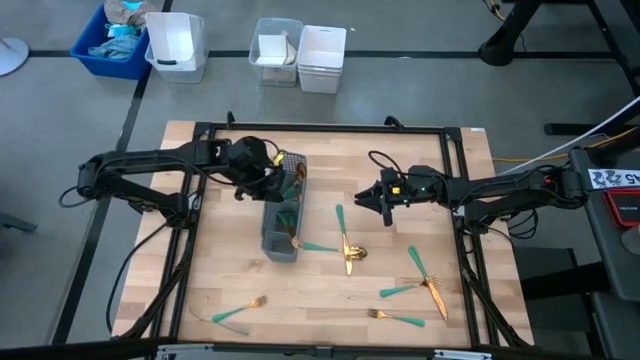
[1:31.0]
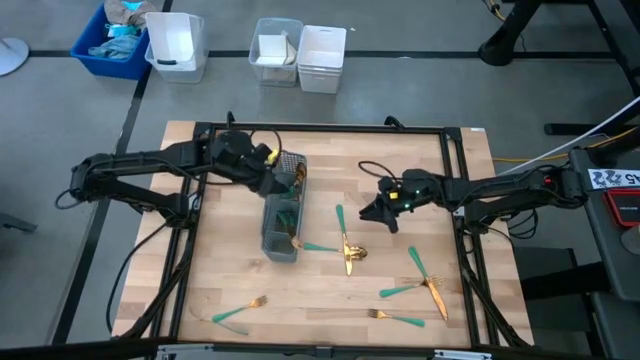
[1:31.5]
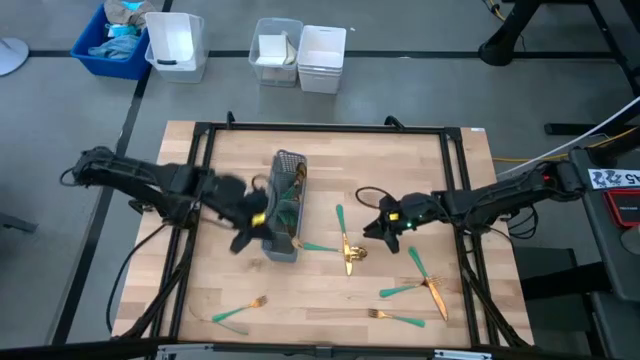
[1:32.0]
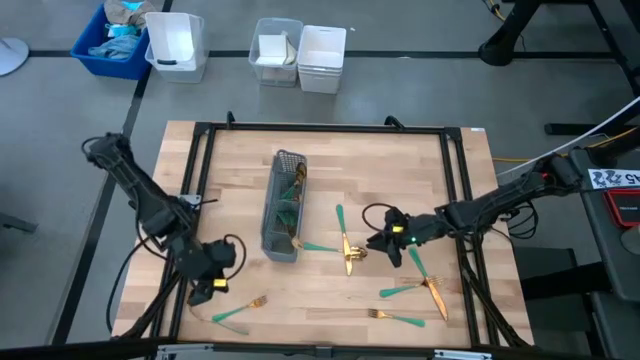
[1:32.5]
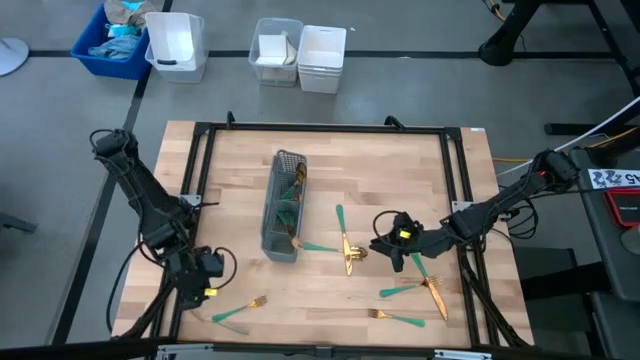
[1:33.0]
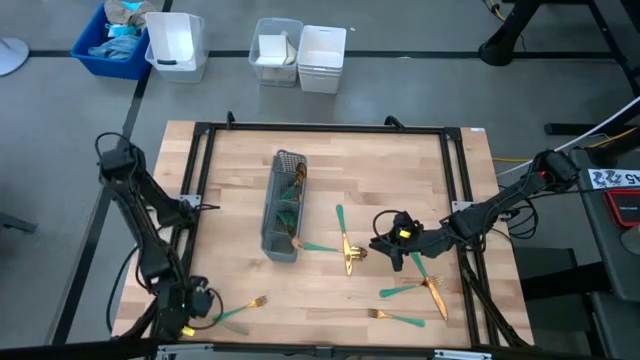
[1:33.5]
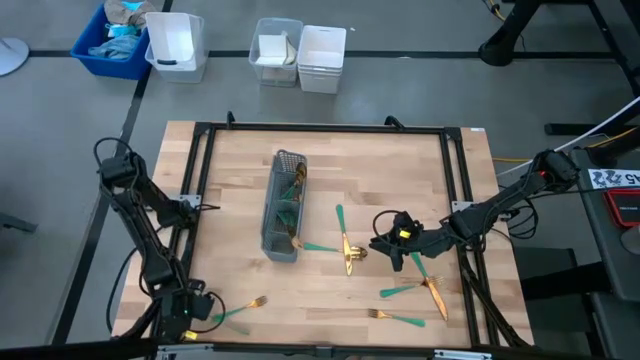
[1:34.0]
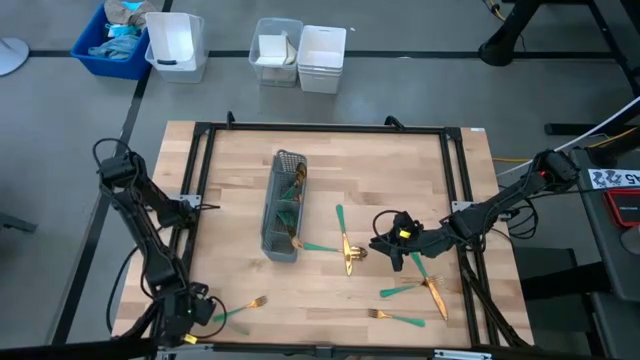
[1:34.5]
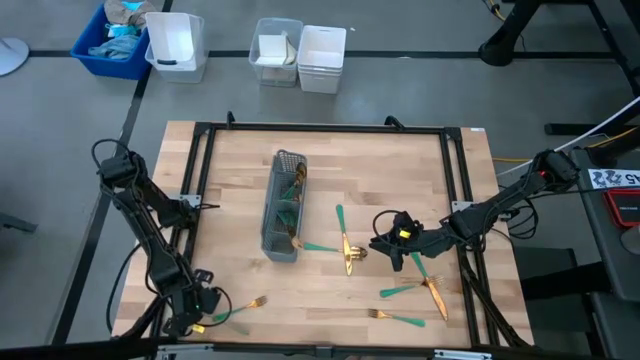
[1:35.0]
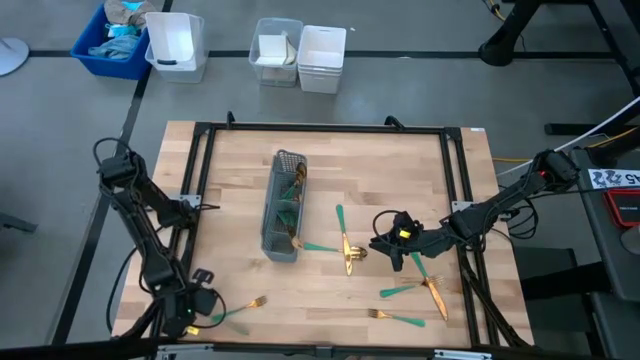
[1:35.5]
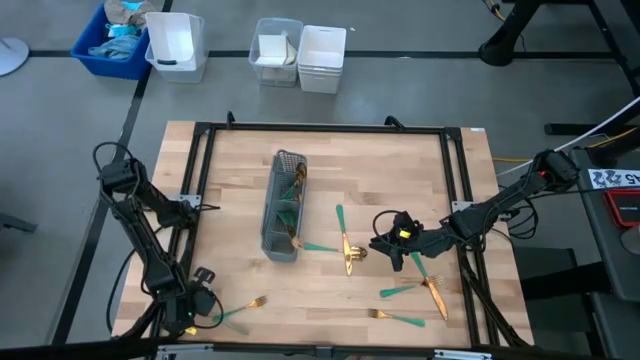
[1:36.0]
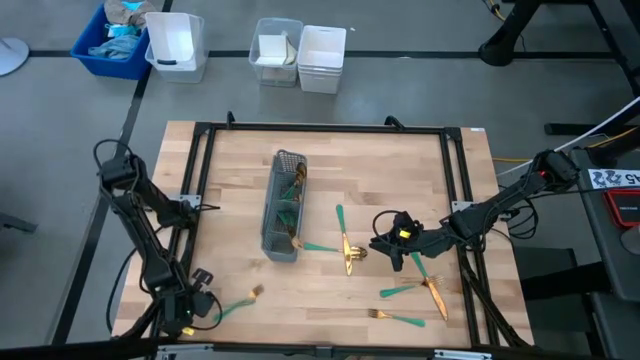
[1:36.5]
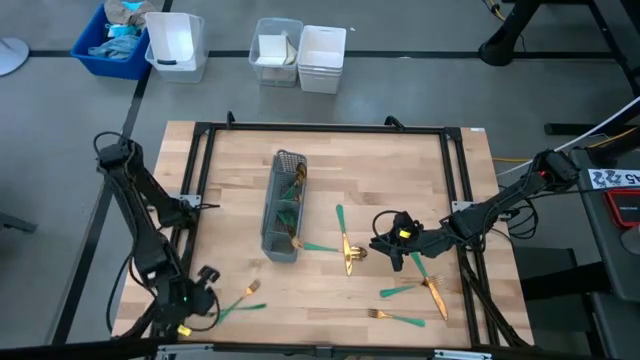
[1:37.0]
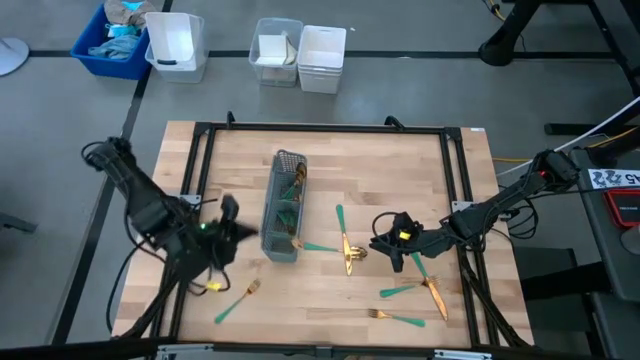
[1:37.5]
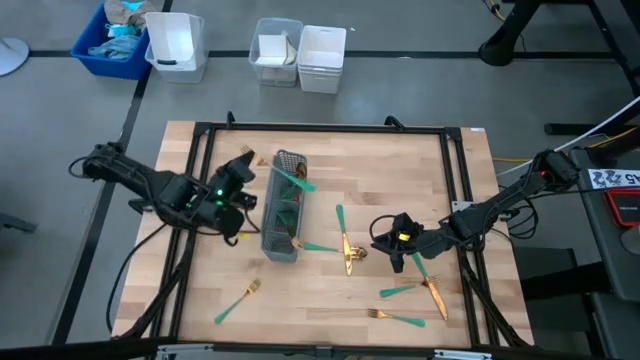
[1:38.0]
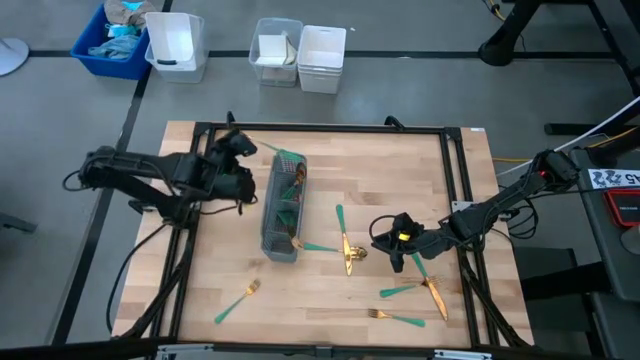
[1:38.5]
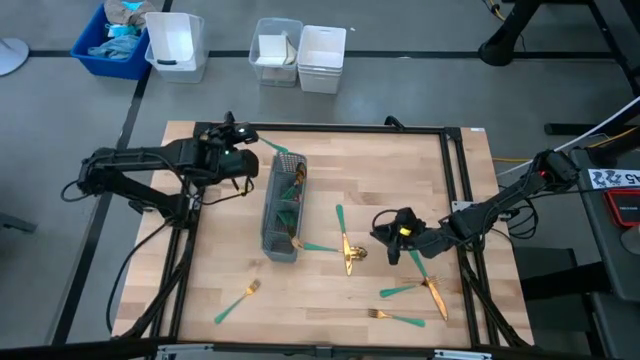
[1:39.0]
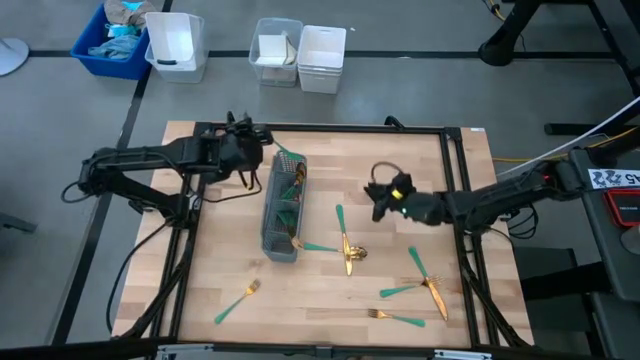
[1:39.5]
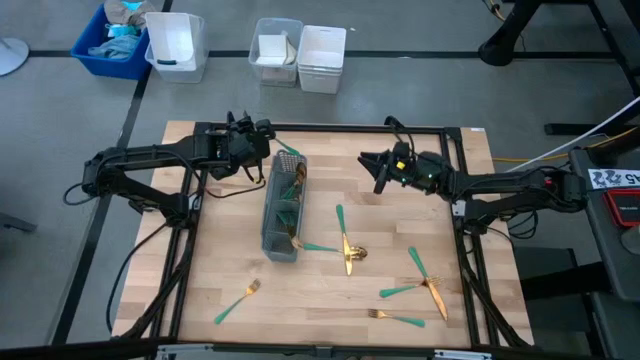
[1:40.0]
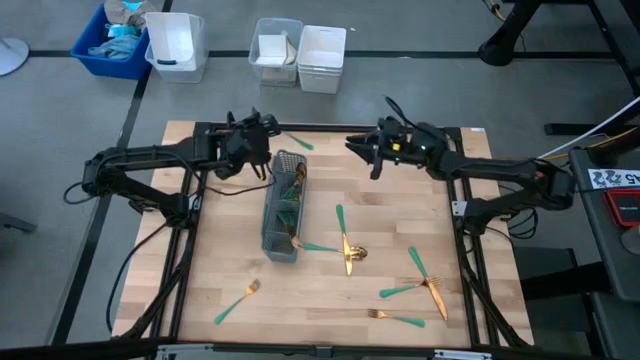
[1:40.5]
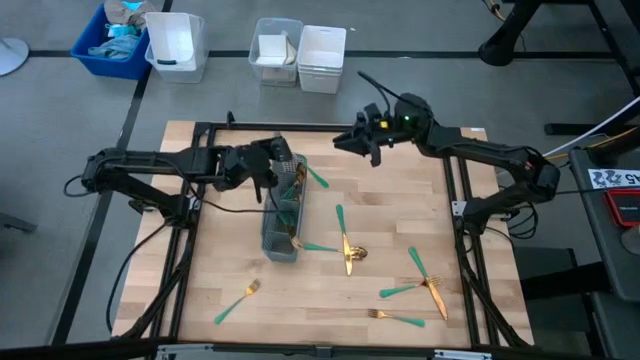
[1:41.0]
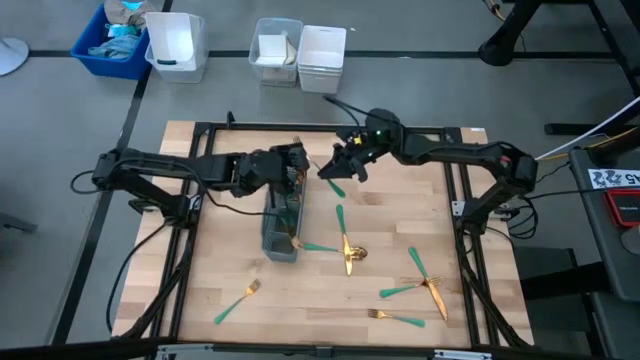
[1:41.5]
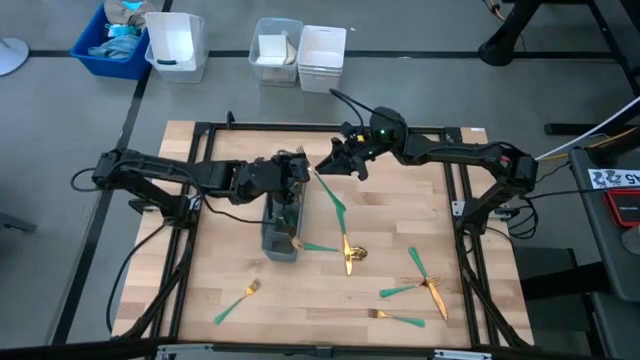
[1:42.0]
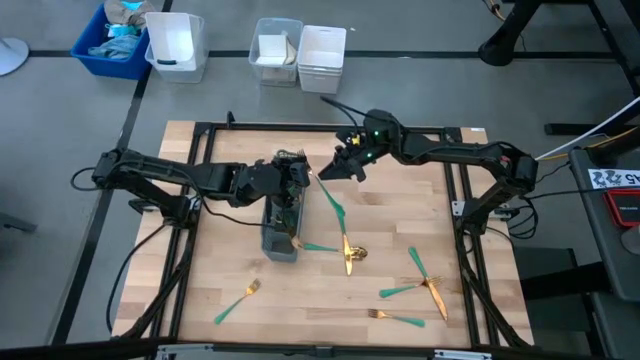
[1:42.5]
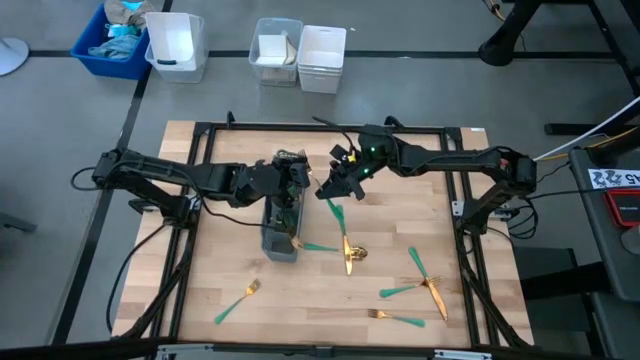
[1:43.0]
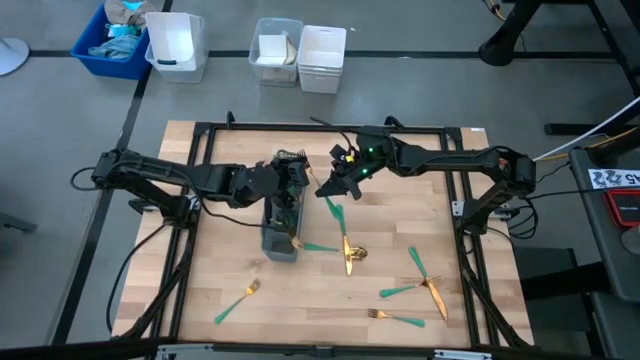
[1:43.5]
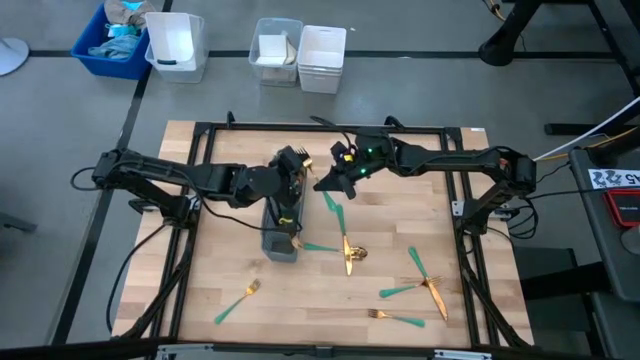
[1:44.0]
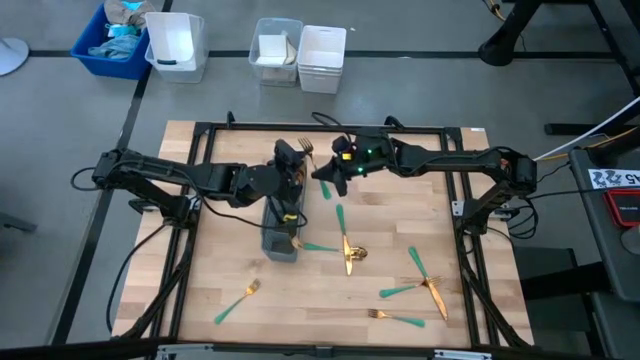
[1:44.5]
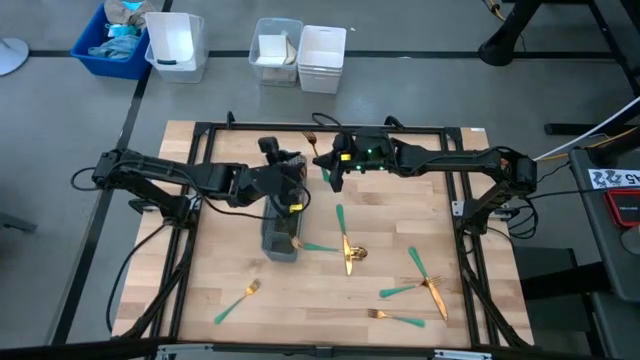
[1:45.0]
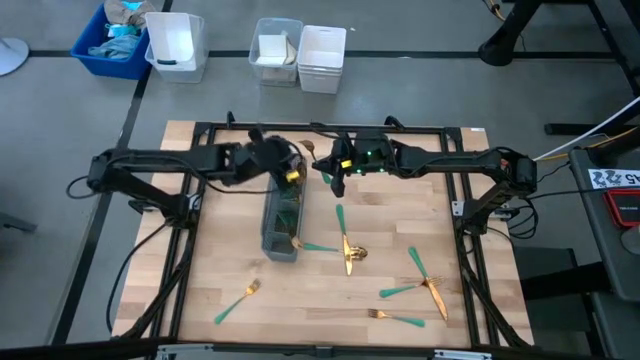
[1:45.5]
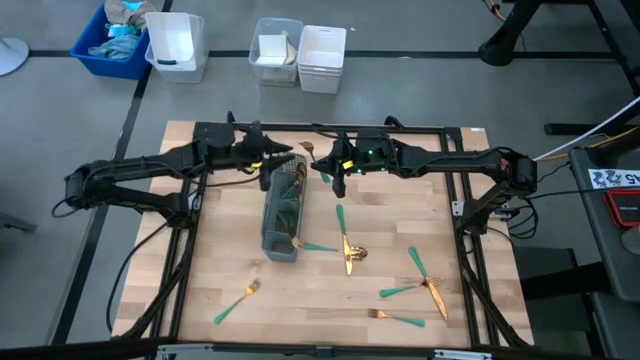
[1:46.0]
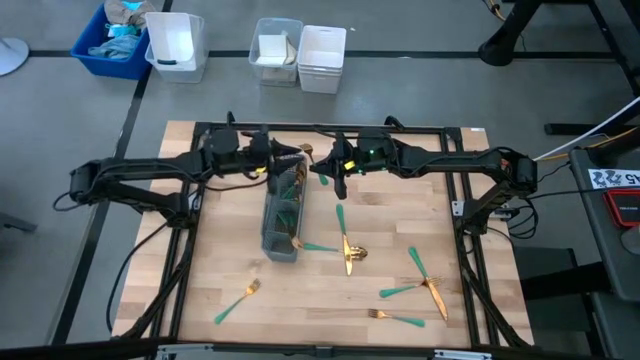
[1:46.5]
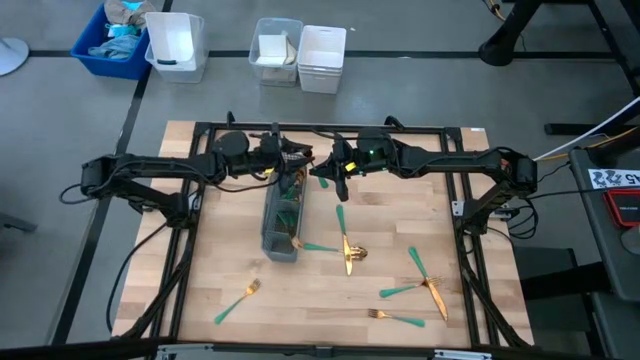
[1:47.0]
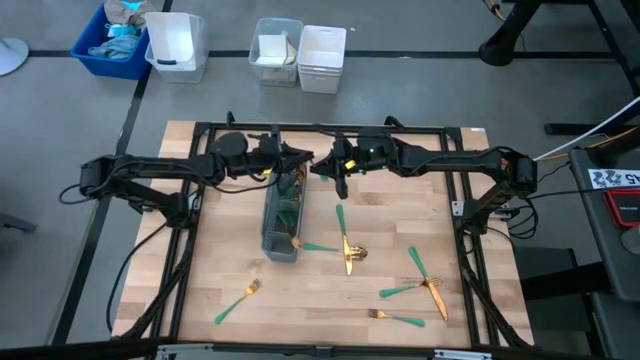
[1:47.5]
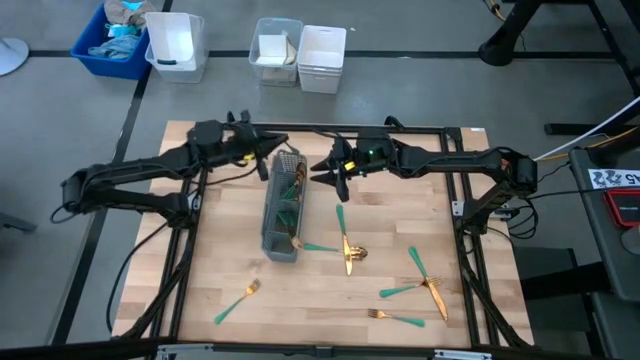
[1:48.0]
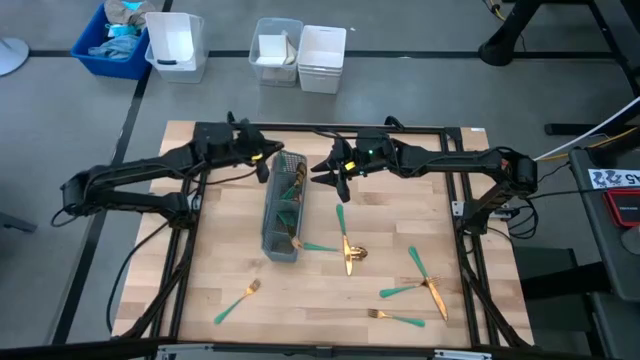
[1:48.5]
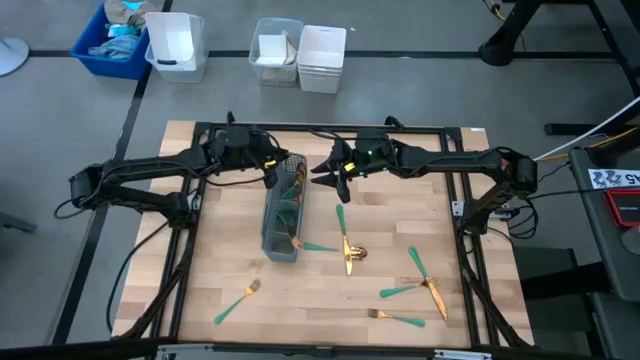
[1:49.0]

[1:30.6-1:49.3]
Task: Sort silverware
Put the green fork into the gray silverware rack

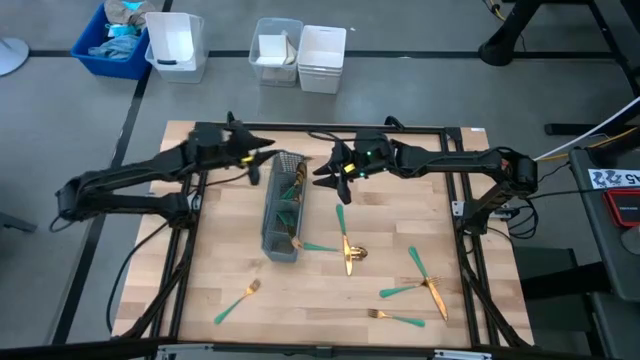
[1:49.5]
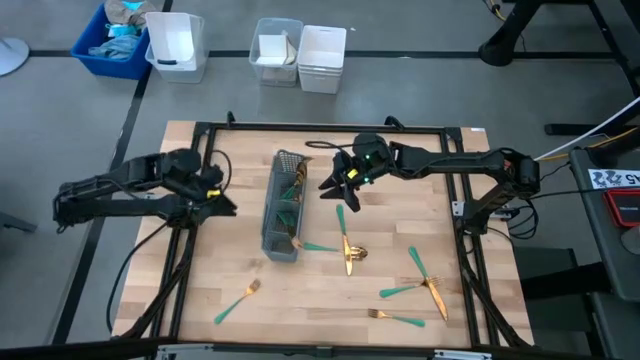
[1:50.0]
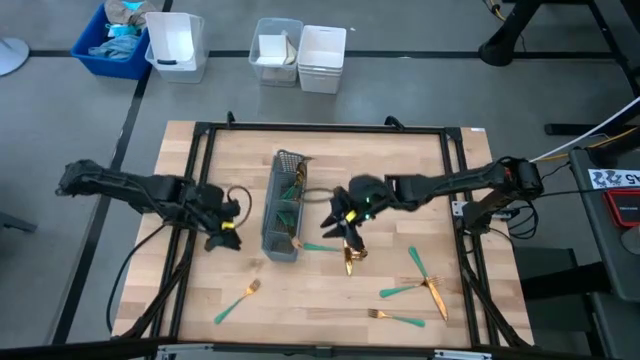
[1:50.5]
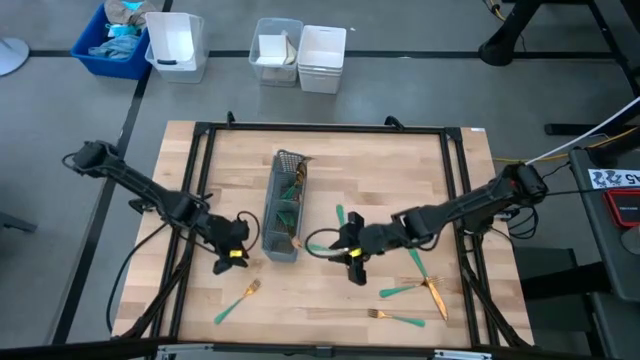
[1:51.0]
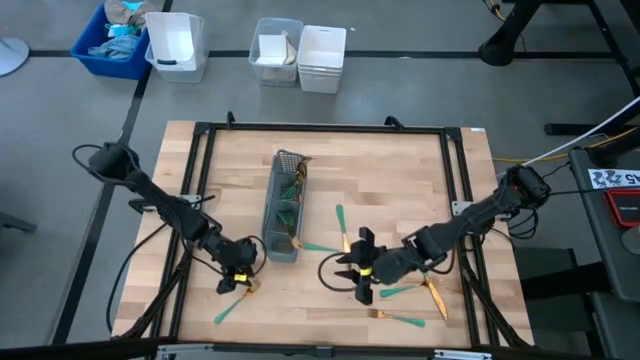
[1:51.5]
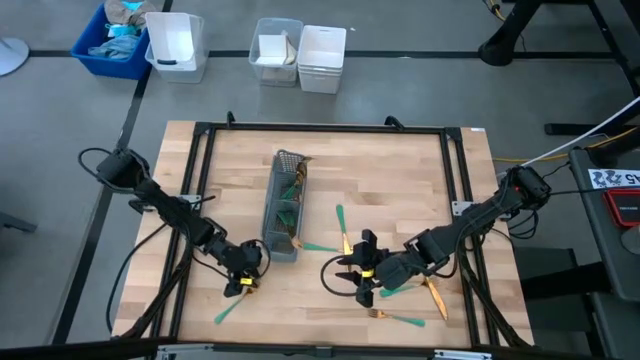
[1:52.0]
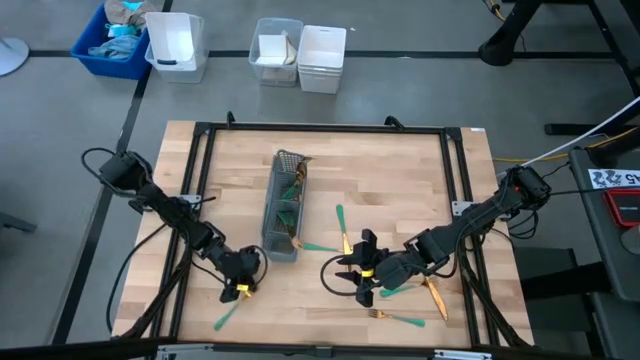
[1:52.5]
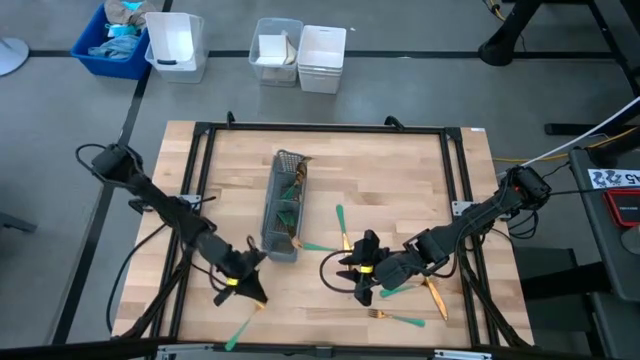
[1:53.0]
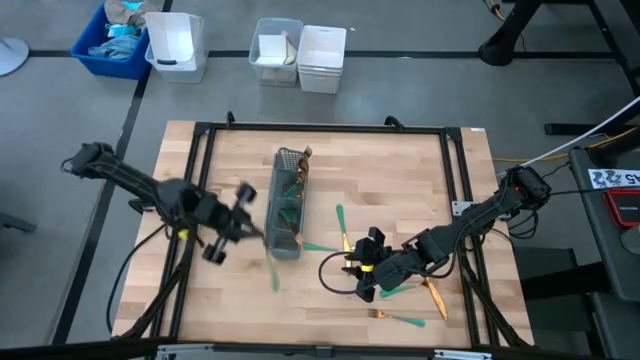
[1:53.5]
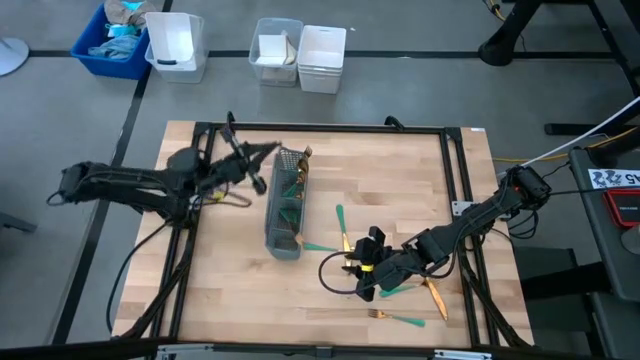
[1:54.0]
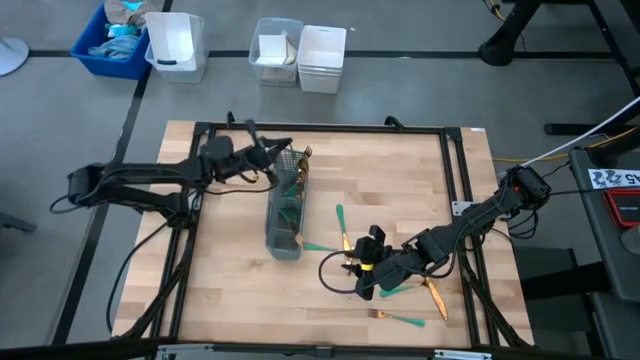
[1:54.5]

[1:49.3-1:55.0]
Put the green fork into the gray silverware rack
